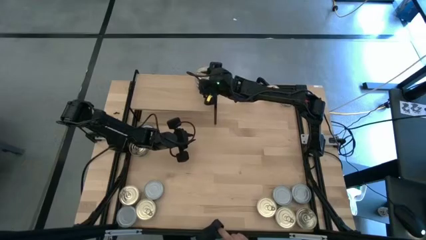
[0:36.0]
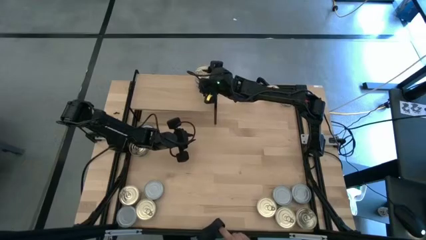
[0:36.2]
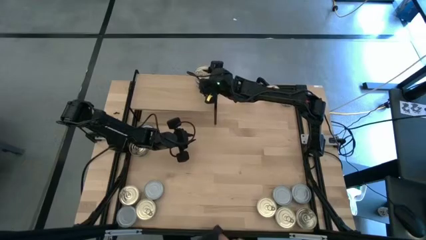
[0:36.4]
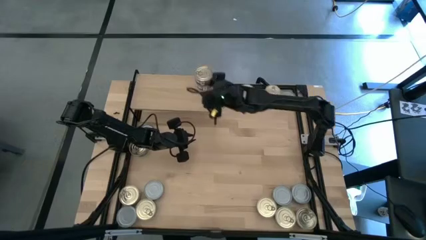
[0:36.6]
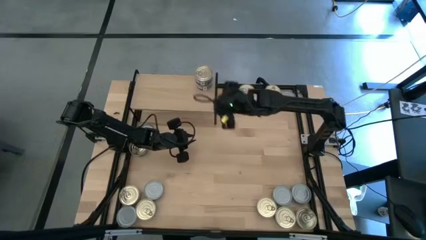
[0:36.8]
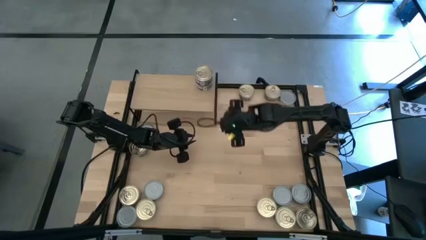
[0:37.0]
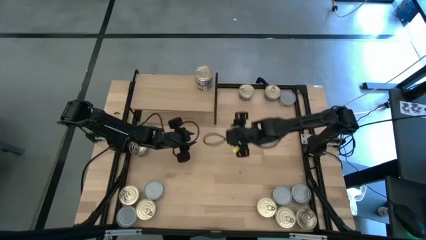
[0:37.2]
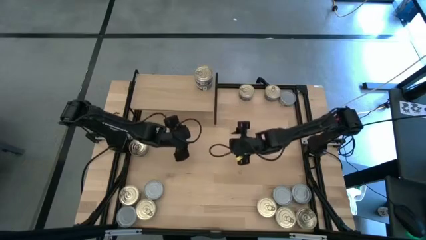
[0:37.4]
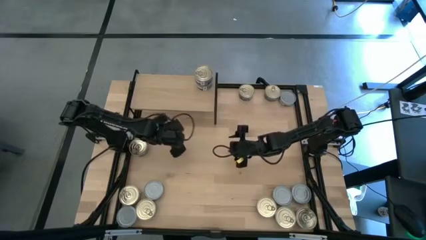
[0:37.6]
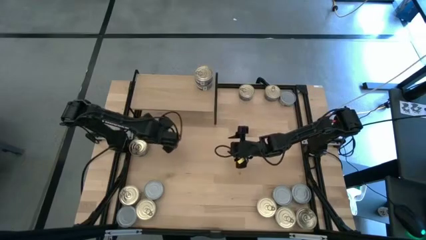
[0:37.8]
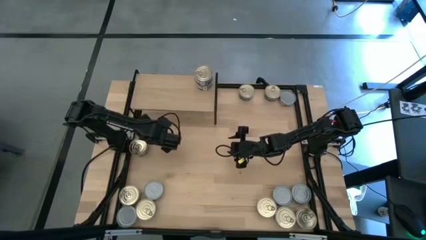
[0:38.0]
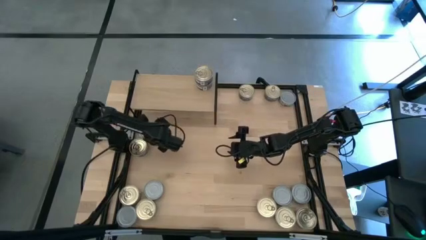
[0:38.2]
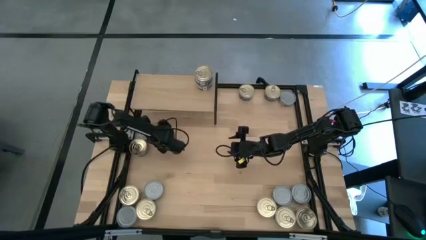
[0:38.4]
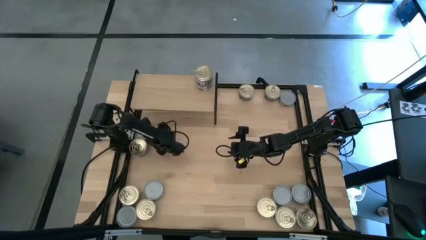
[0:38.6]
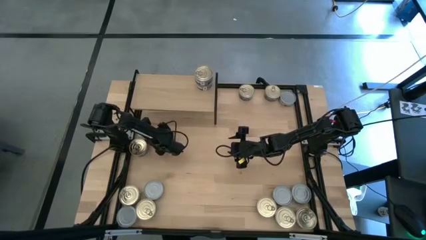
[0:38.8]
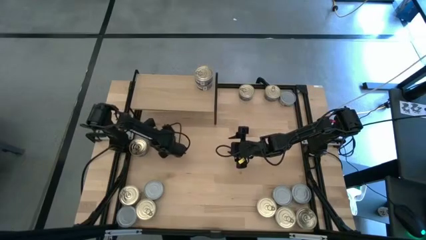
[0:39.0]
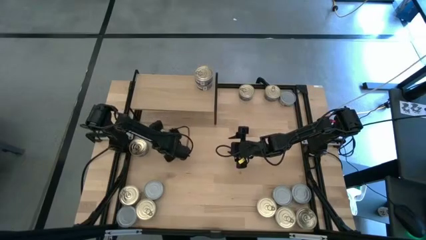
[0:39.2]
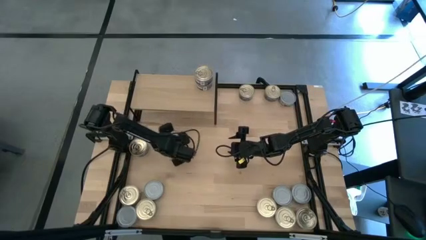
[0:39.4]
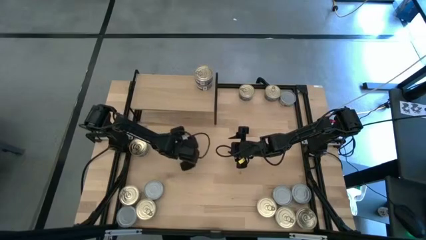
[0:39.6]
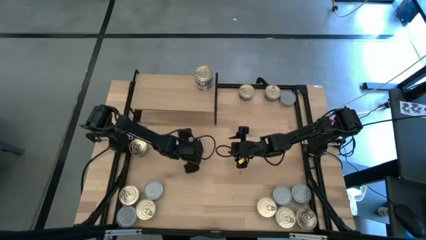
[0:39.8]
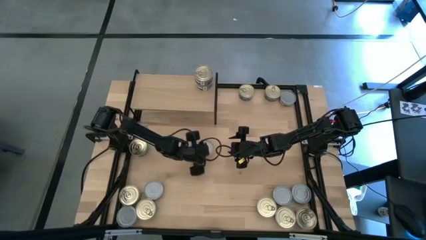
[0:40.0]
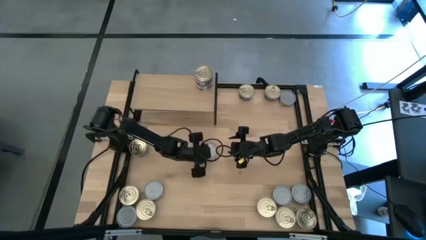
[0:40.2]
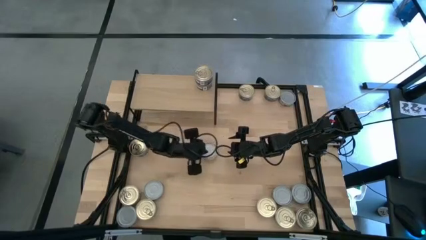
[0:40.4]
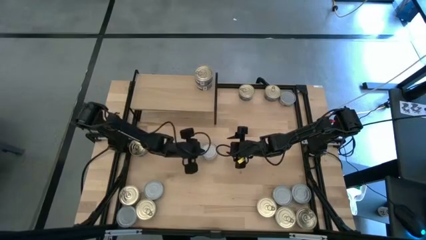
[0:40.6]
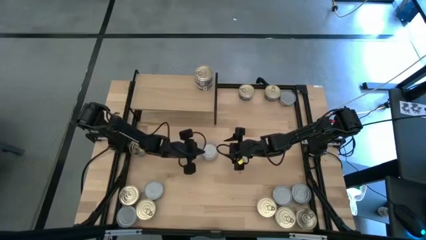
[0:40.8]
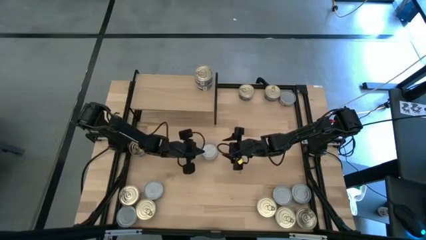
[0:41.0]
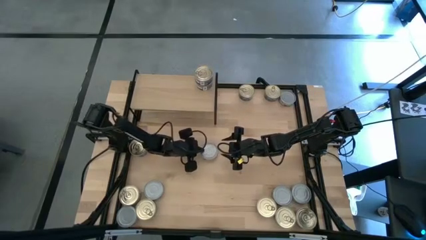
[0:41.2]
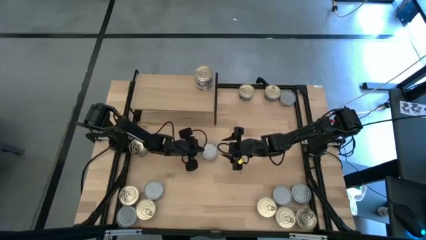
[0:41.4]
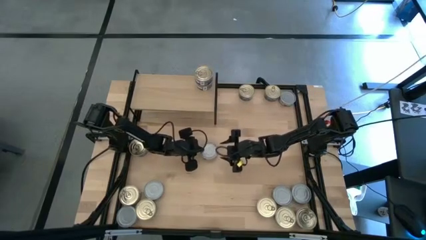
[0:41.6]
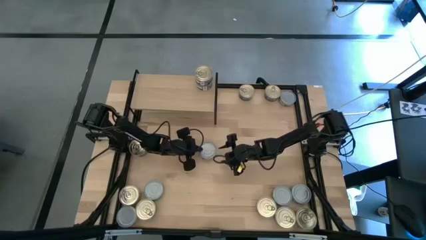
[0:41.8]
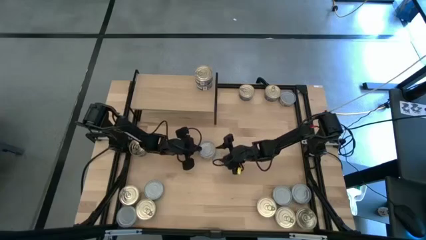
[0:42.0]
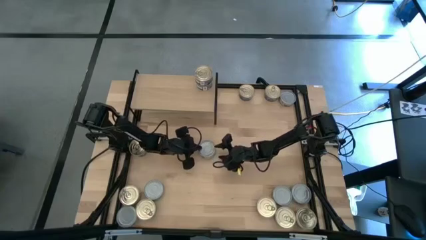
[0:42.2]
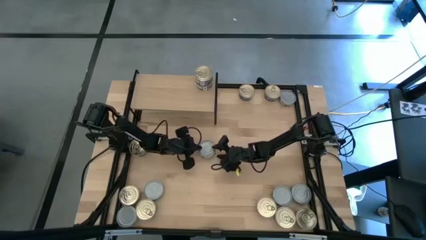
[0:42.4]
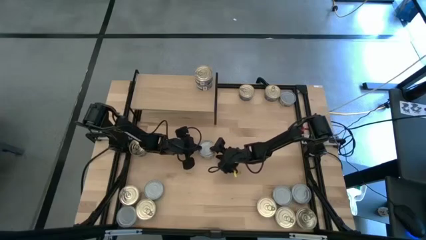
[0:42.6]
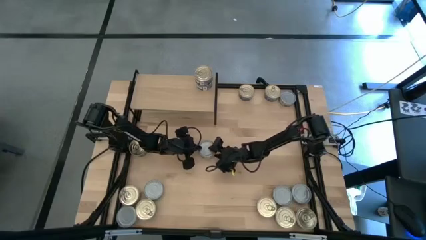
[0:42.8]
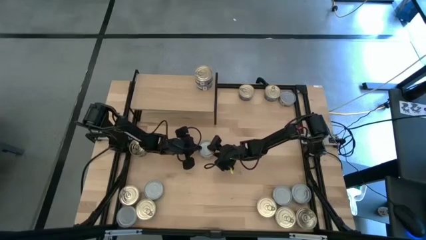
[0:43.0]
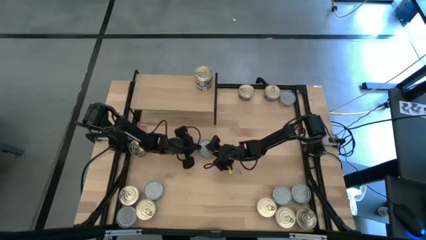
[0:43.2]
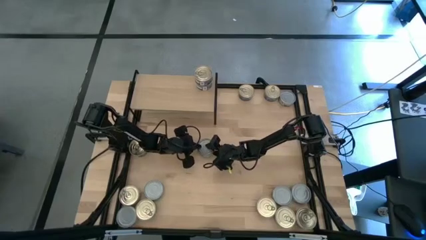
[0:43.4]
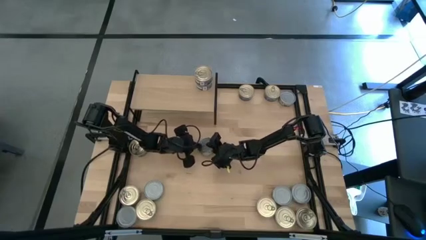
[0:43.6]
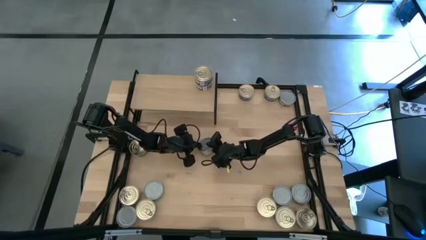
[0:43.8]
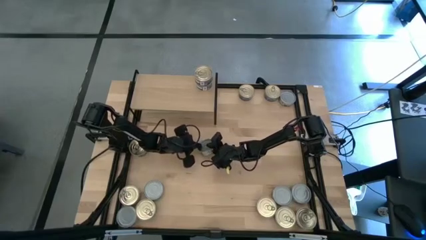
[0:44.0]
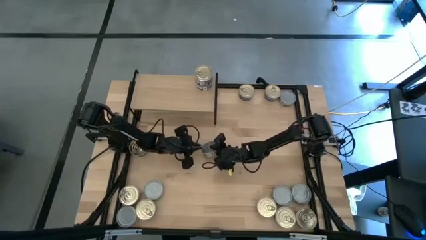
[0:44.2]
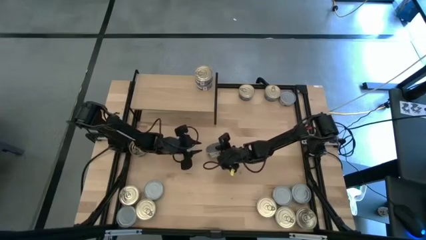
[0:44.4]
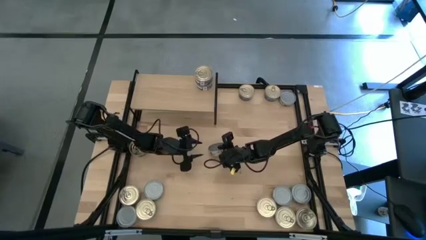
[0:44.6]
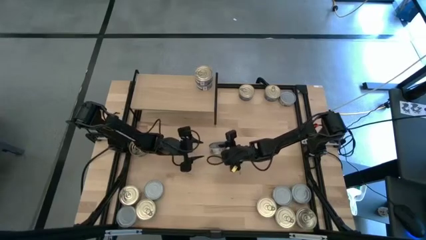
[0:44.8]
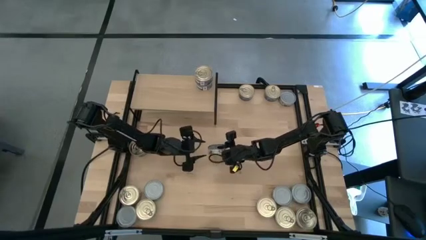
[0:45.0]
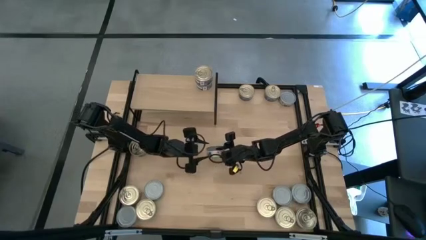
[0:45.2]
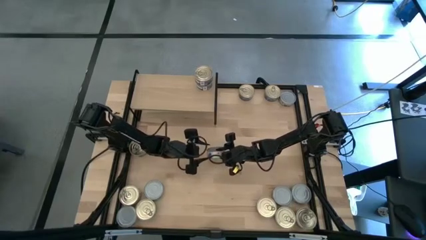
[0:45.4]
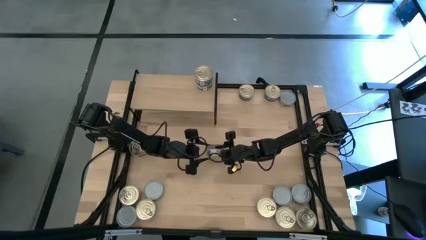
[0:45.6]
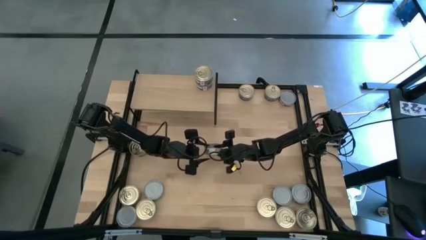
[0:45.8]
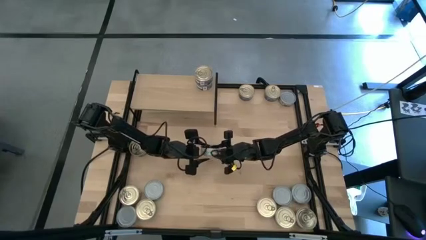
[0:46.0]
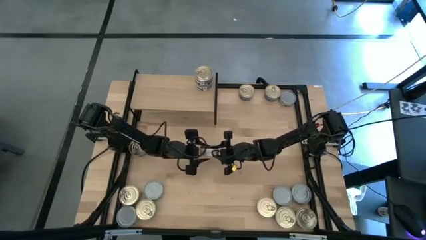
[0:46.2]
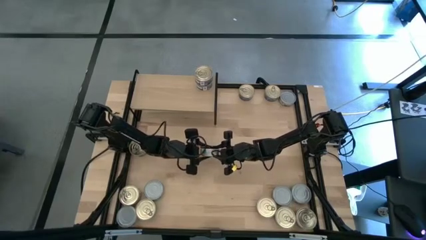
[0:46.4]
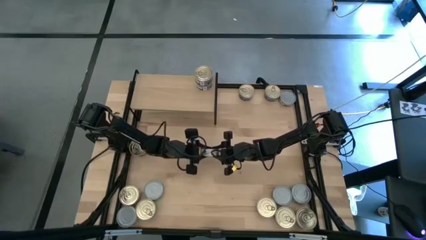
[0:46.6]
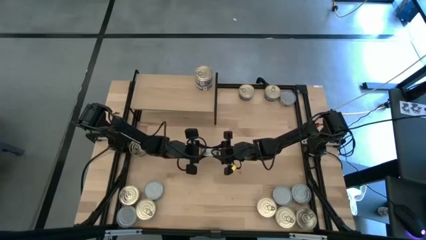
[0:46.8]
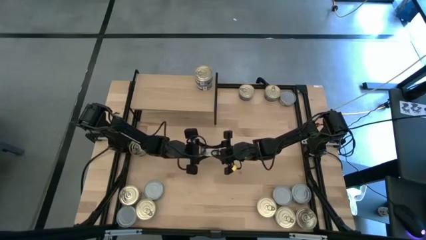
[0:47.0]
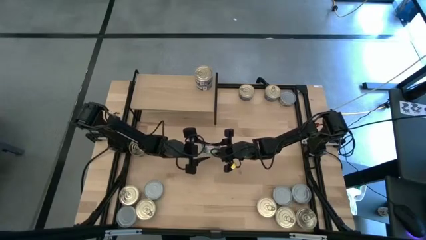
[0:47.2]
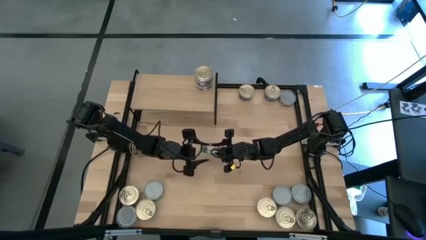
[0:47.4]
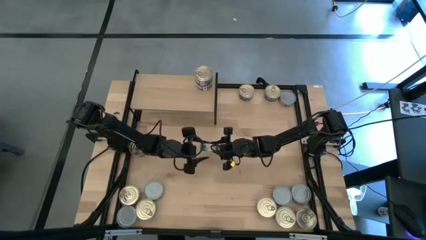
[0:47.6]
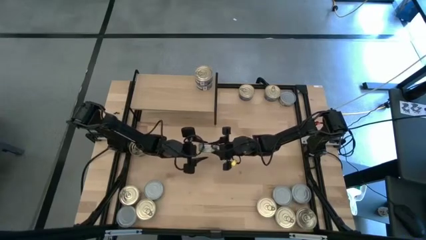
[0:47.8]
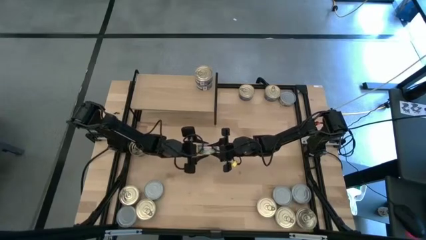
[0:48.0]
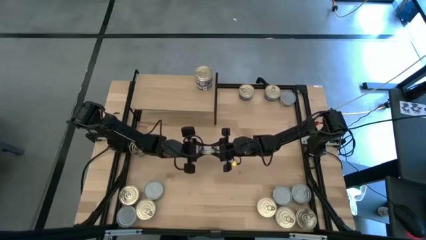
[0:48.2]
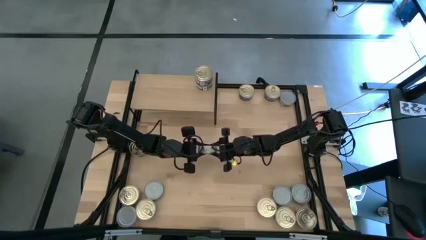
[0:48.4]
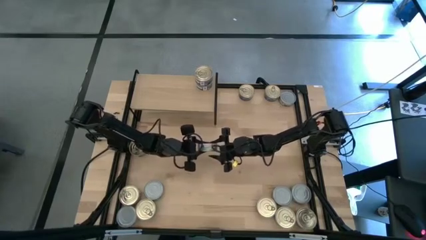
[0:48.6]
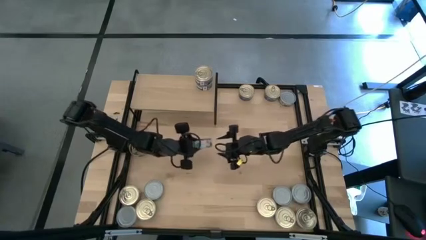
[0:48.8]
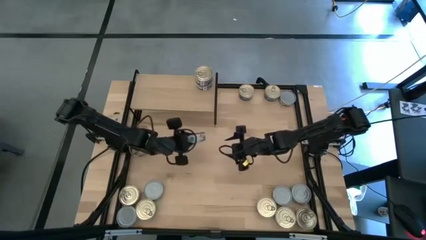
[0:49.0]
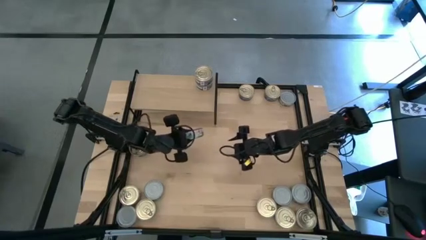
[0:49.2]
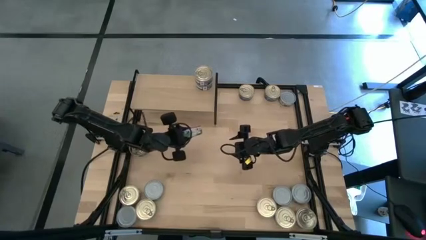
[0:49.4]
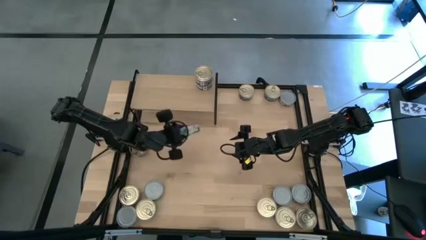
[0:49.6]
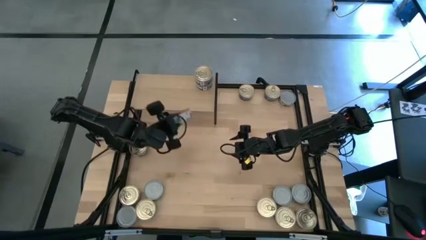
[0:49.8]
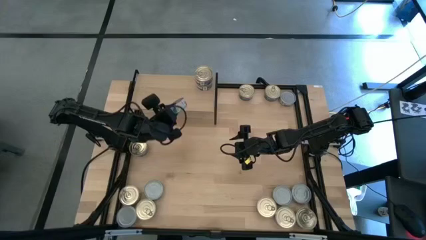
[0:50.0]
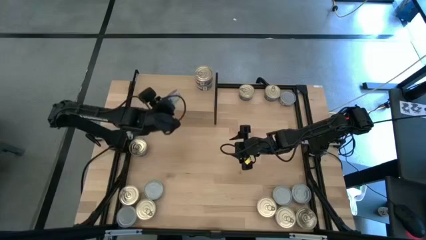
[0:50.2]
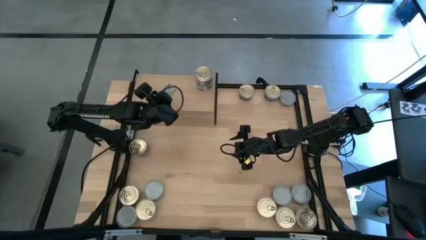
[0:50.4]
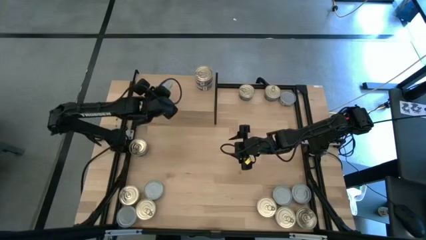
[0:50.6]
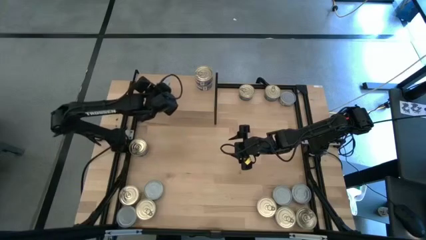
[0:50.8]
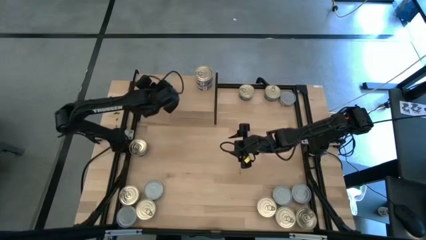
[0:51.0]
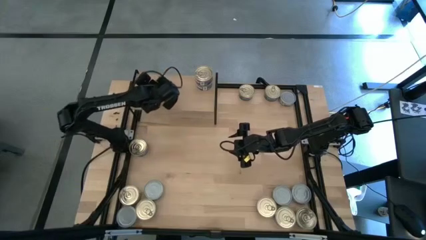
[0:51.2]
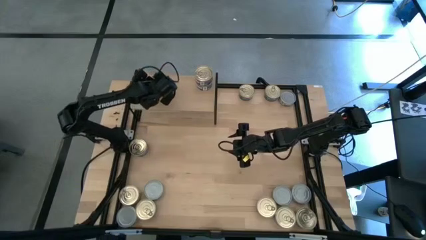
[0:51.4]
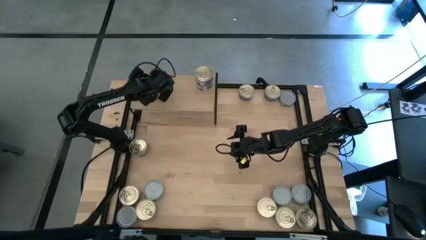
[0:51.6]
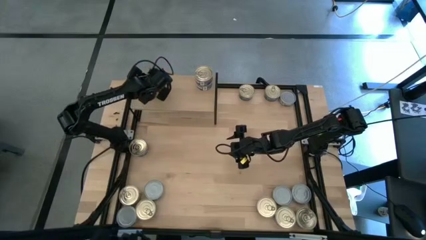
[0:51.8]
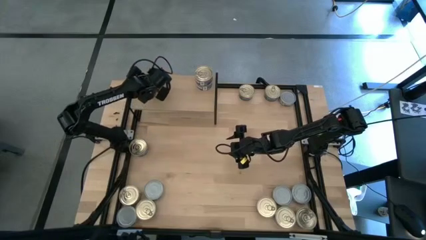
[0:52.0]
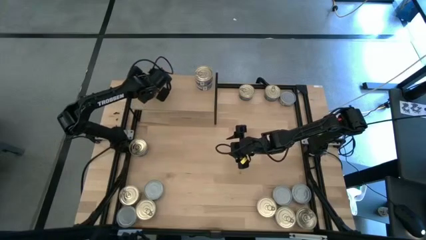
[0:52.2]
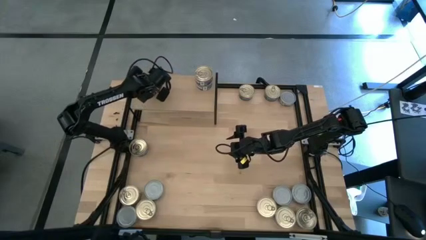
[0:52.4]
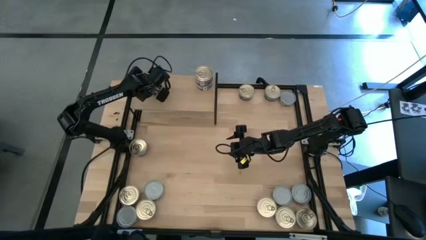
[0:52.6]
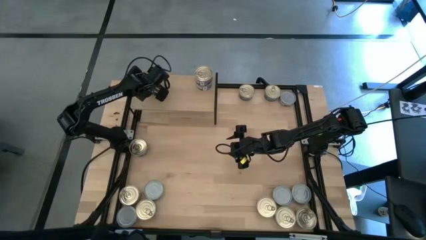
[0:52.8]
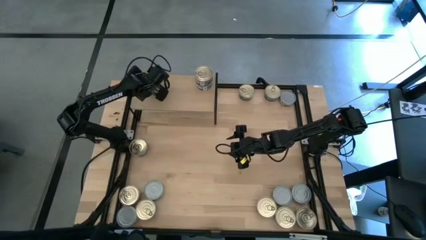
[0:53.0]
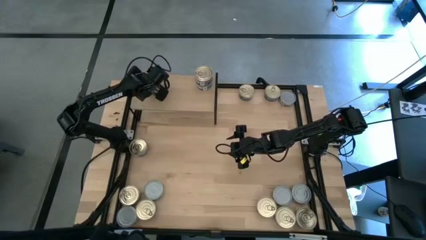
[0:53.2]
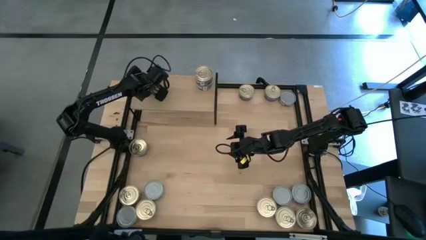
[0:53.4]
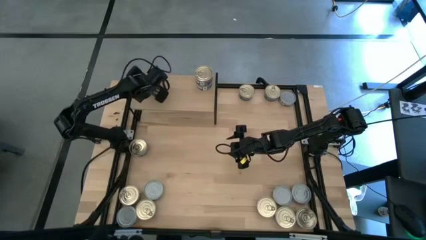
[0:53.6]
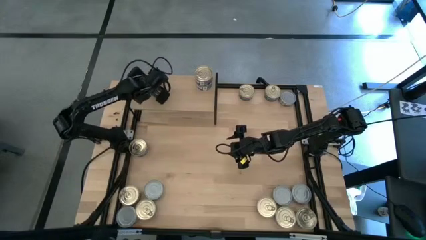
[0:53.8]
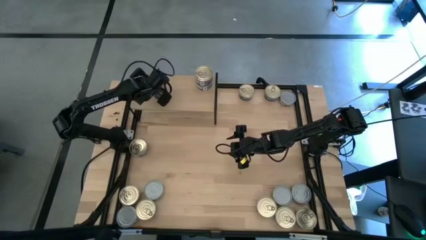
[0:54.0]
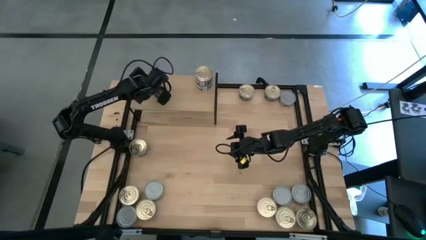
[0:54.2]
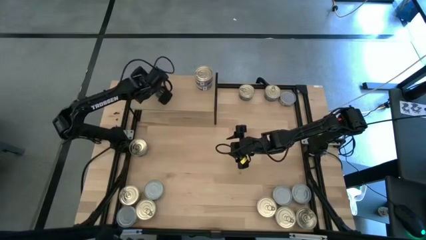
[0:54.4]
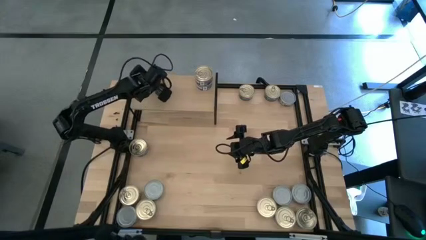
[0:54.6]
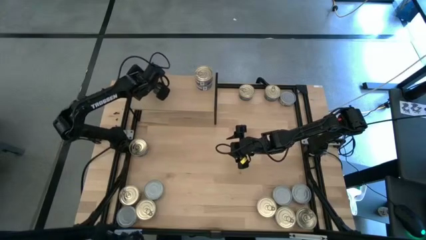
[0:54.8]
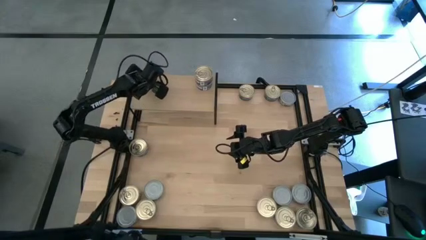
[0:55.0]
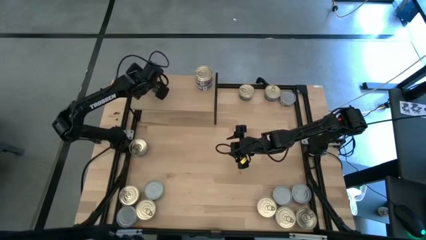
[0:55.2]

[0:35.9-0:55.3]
Task: Stack canned seafood by type on shelf
Put the green tuna can on the shelf
